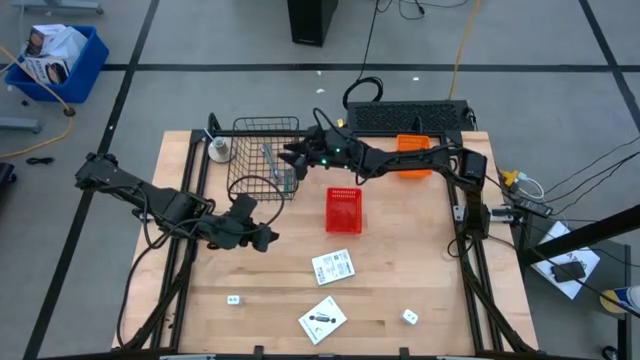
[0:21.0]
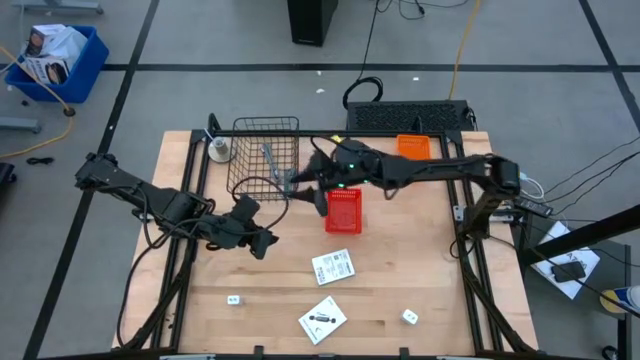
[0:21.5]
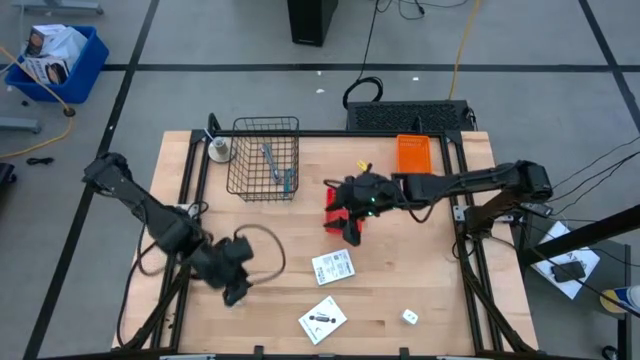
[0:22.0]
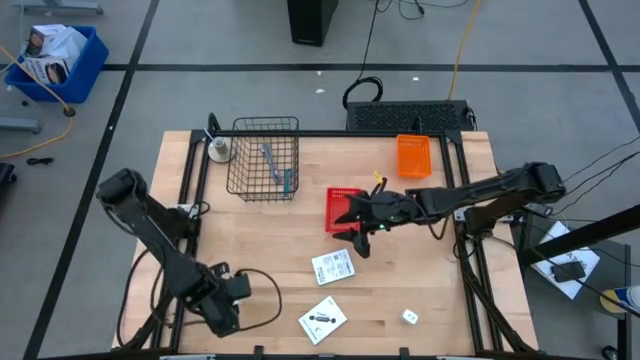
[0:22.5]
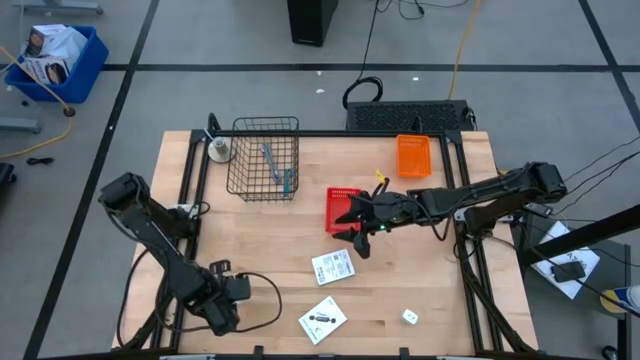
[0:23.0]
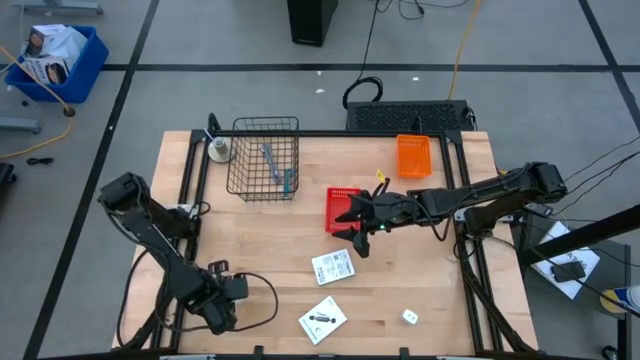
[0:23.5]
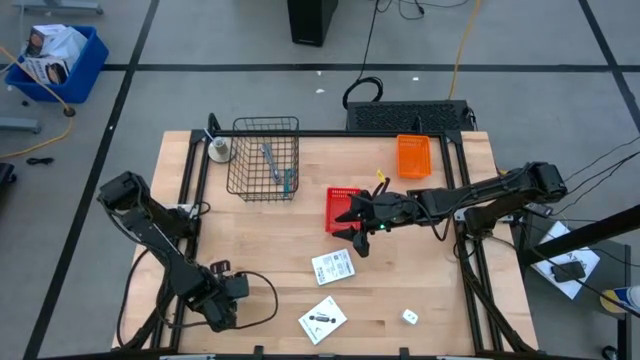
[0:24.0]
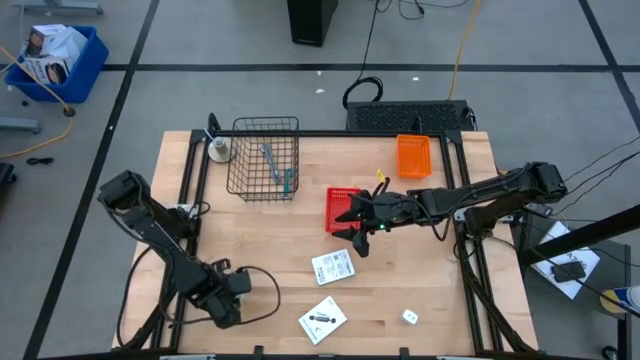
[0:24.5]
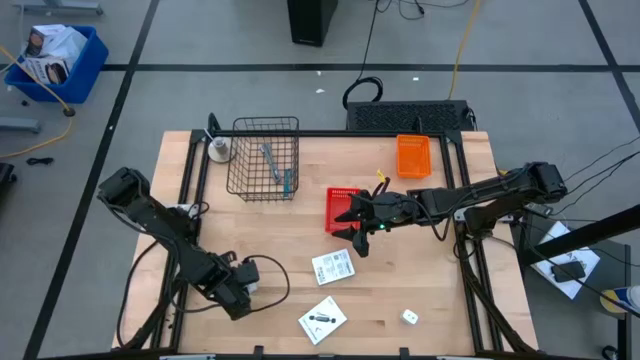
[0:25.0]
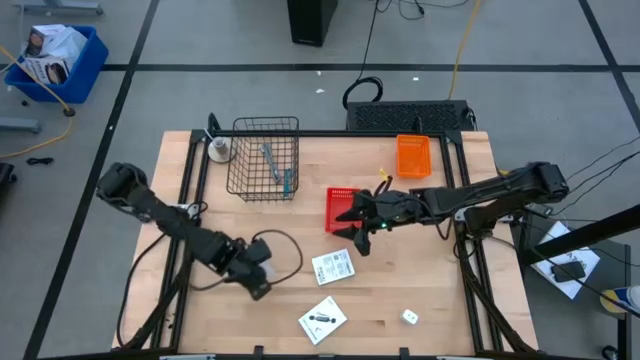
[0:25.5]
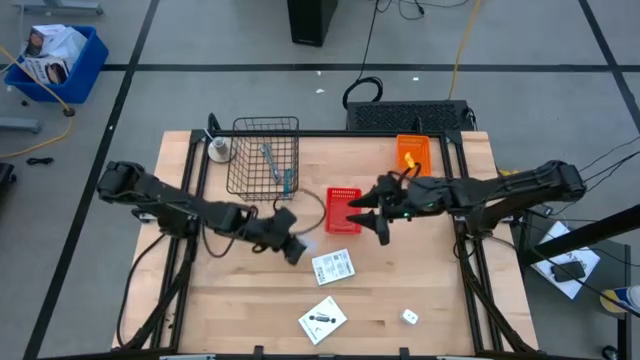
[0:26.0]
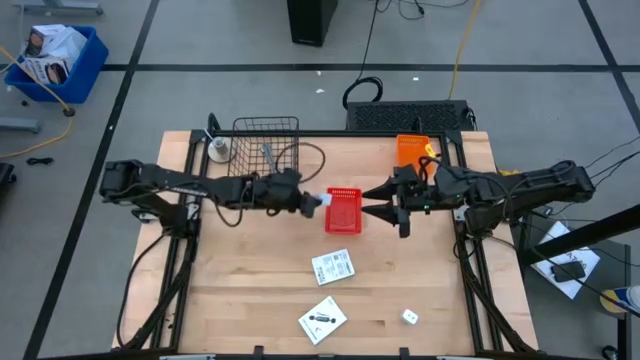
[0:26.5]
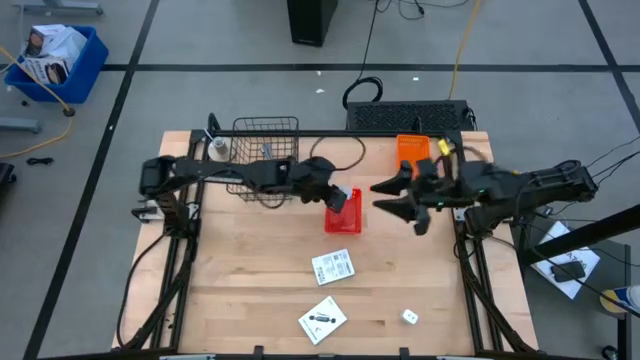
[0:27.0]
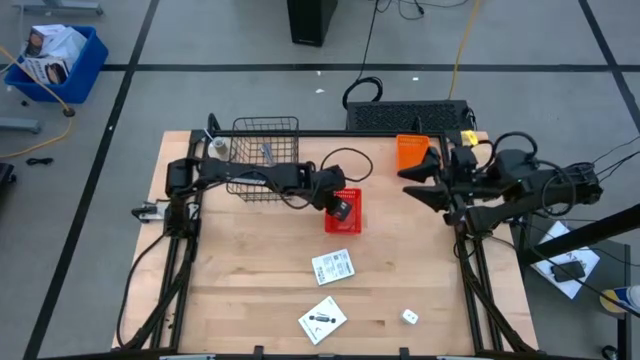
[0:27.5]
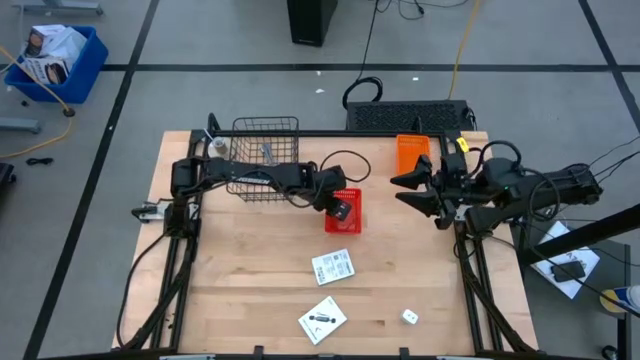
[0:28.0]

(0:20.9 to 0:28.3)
Task: Pick and place items into bin
Put the left white charger adapter into the red bin

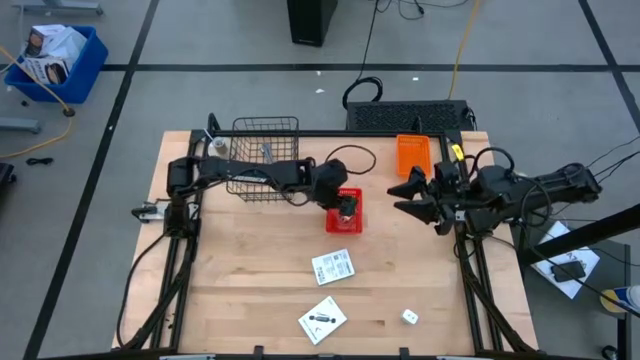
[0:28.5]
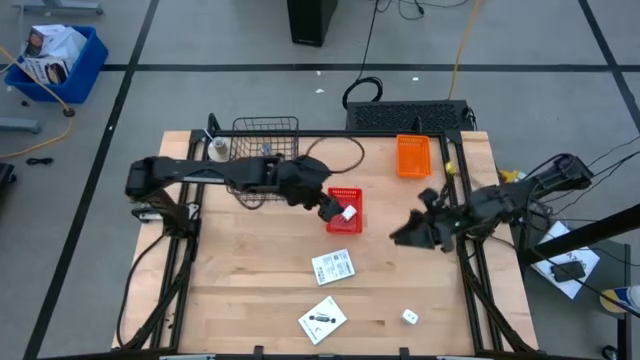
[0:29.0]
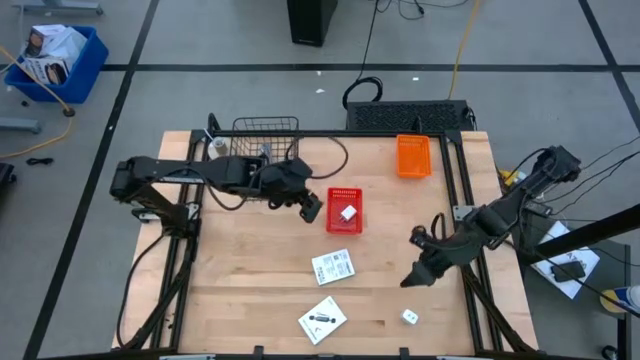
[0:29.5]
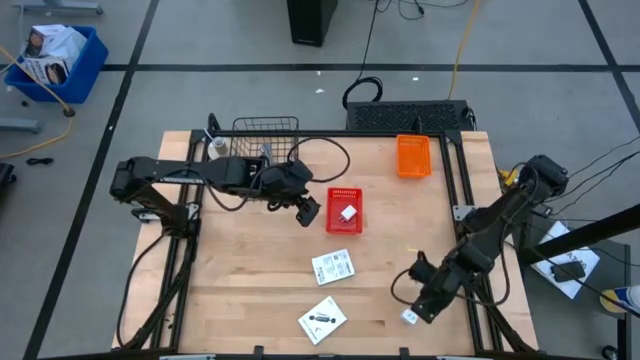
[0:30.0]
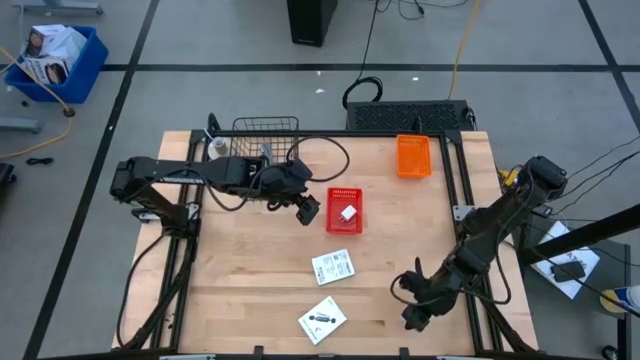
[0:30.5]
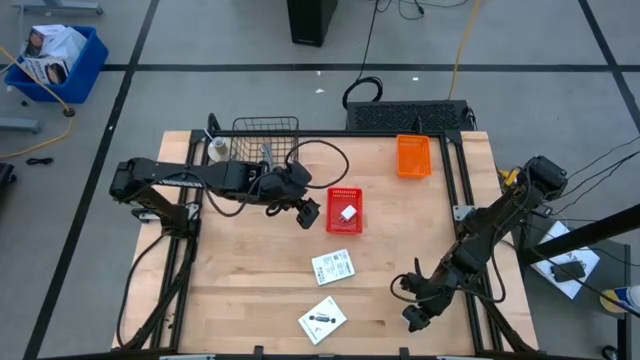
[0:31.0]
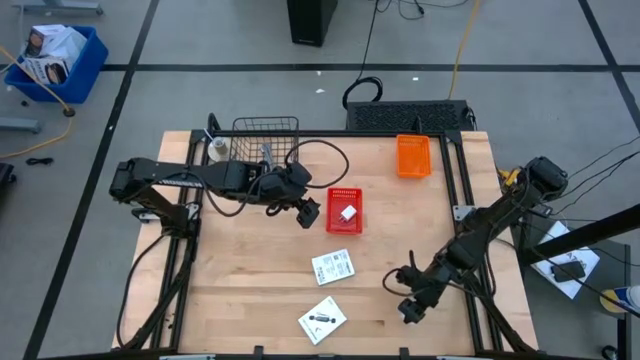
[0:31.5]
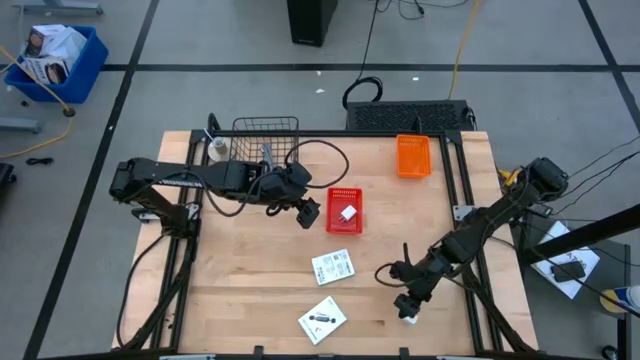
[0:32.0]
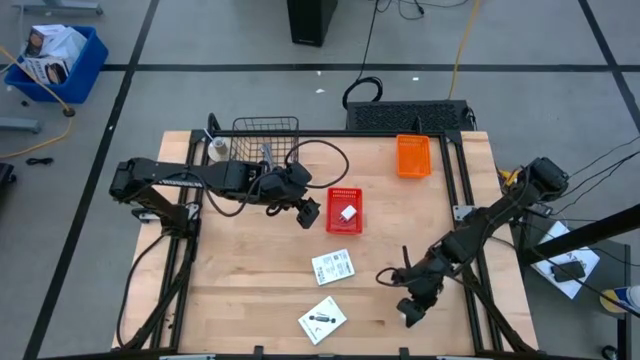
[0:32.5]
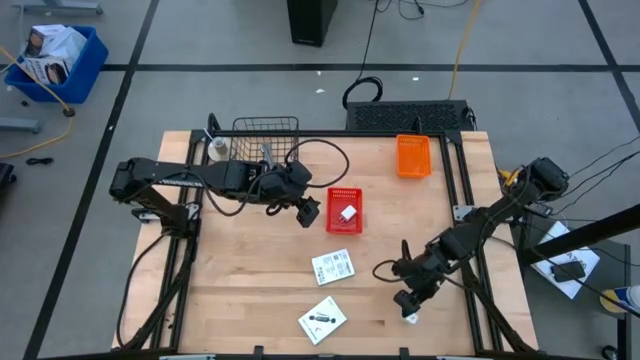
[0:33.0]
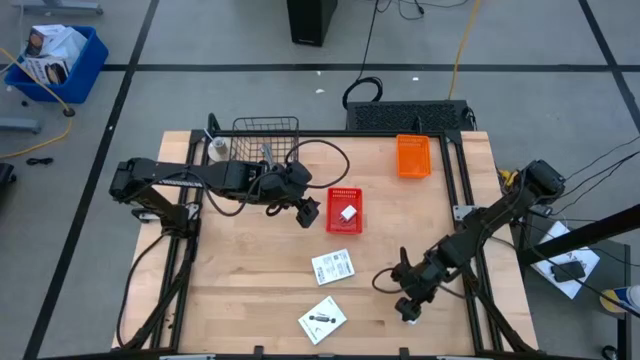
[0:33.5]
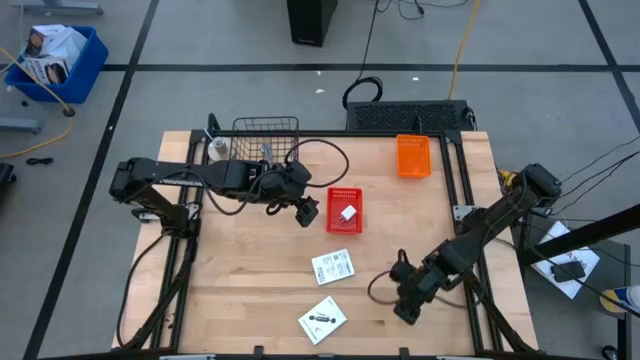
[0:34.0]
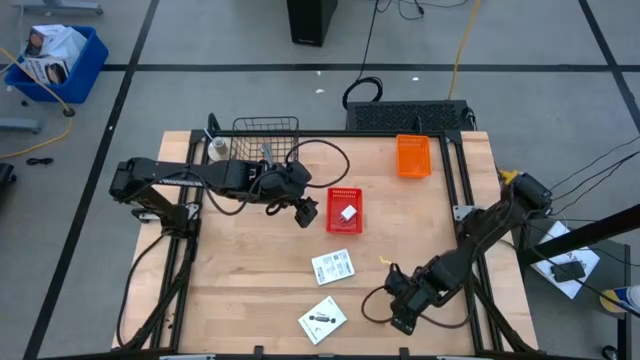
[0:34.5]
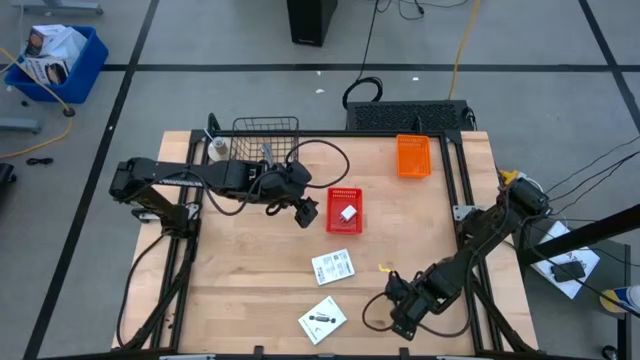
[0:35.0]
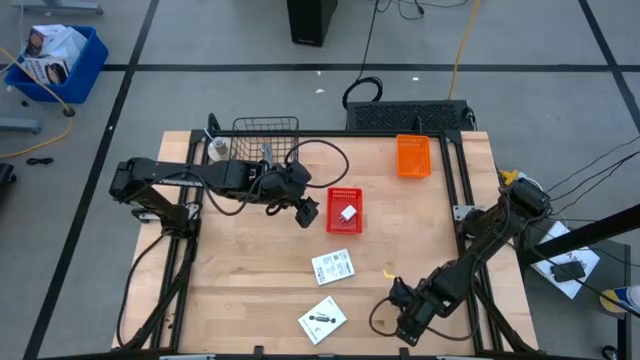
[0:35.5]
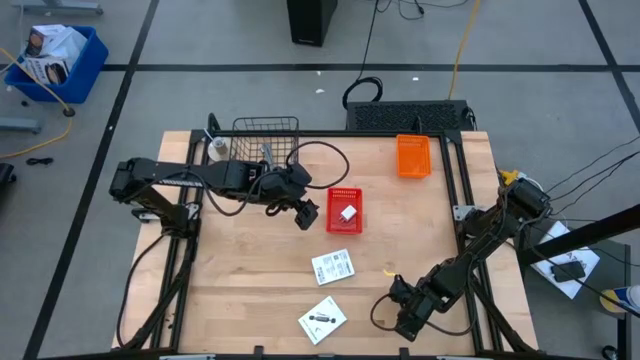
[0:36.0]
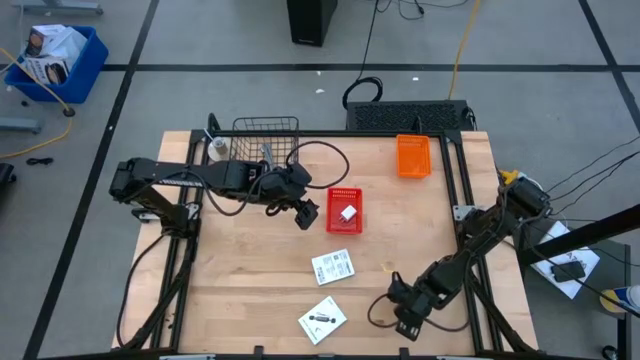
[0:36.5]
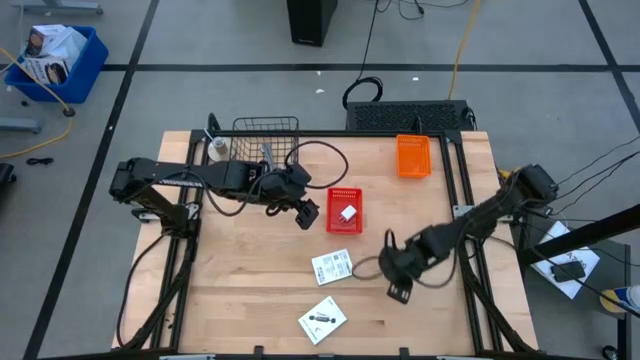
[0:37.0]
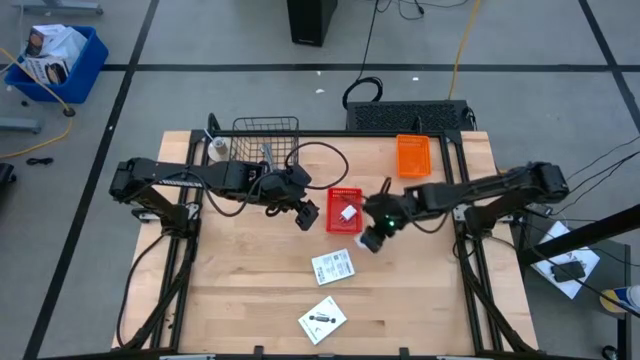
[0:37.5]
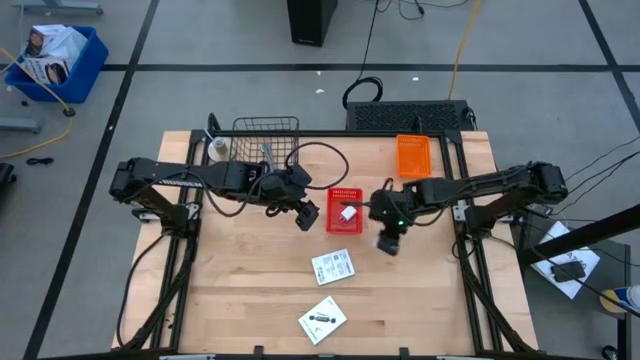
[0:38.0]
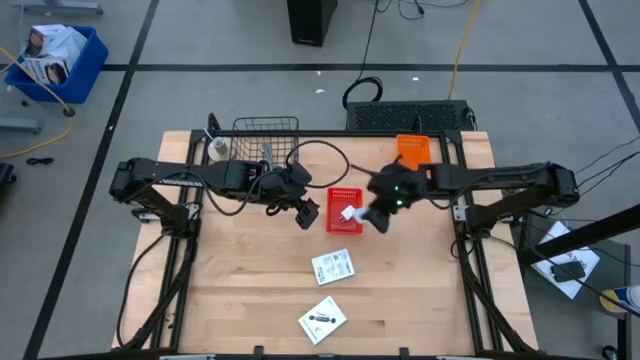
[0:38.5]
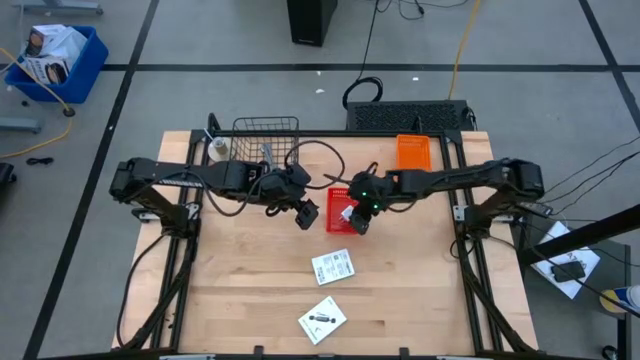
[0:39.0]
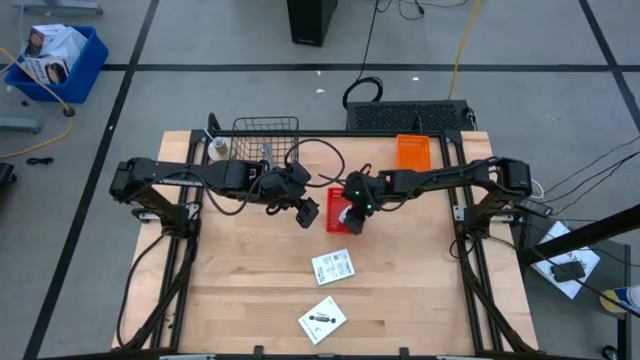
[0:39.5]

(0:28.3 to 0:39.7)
Put the white charger adapter into the red bin

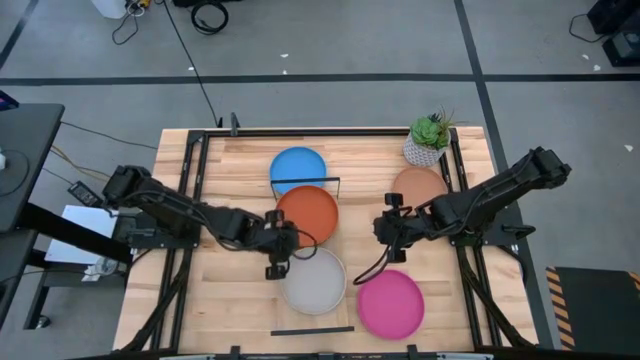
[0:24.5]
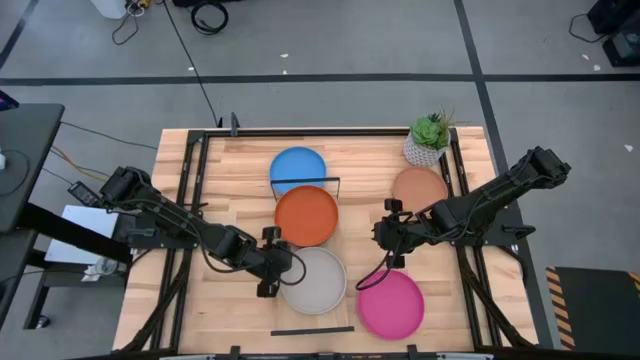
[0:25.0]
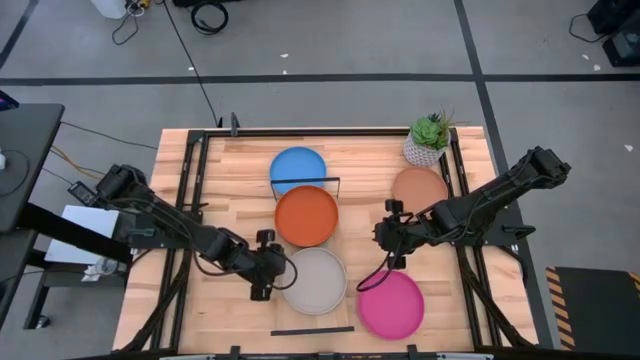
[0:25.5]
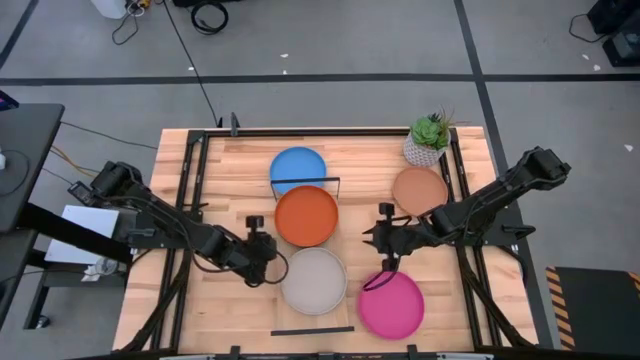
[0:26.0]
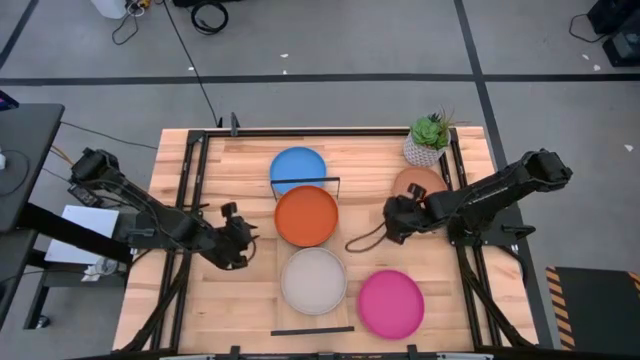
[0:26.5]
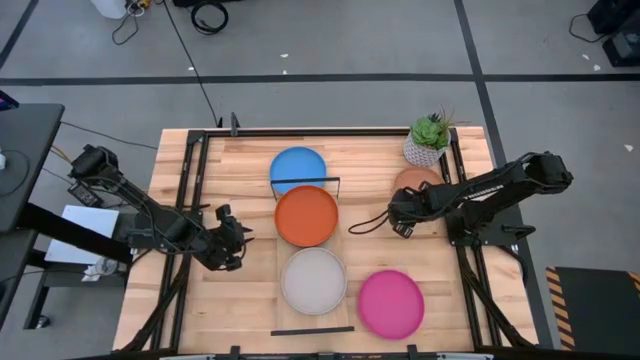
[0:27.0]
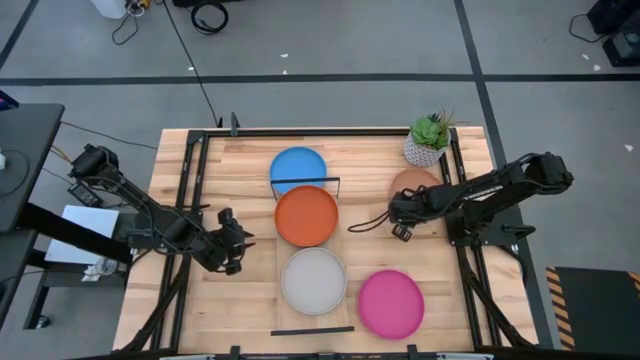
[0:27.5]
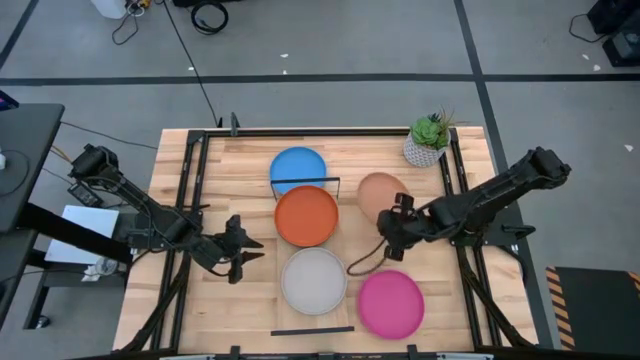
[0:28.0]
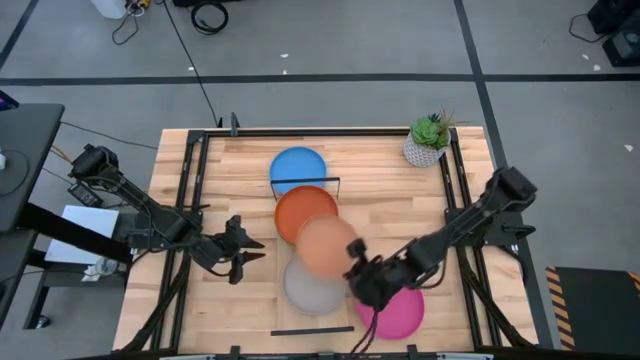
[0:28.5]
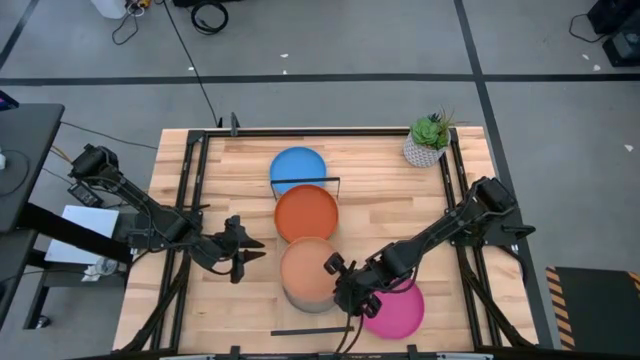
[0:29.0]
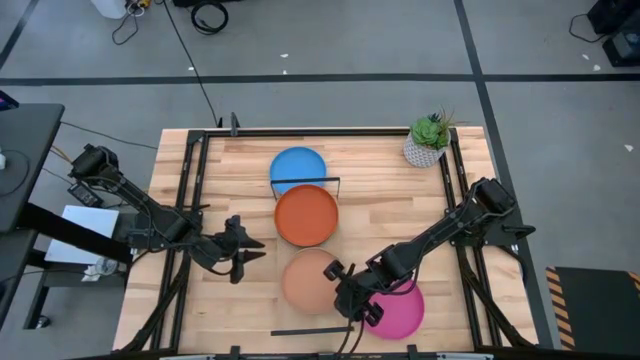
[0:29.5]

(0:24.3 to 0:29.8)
Task: Place and stack plates onto a shelf
Stack the brown plate on top of the gray plate on the shelf
